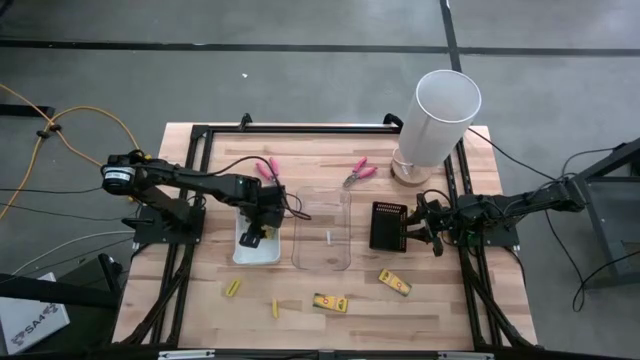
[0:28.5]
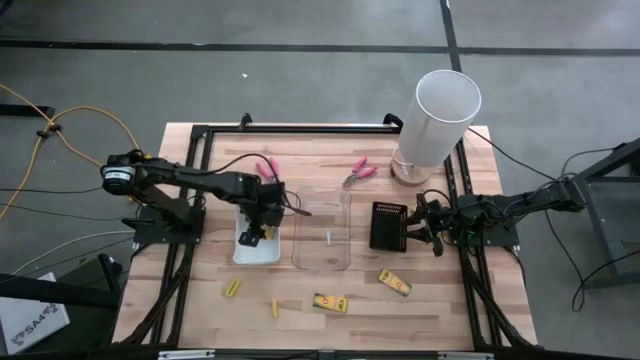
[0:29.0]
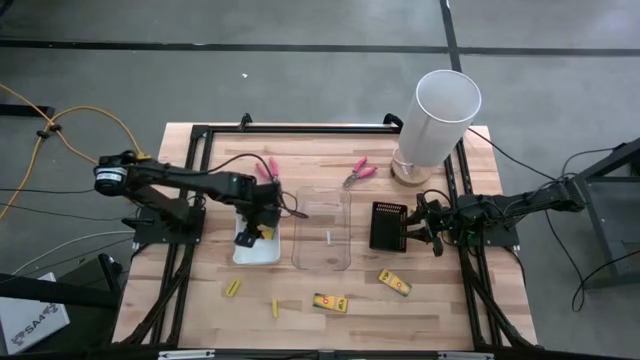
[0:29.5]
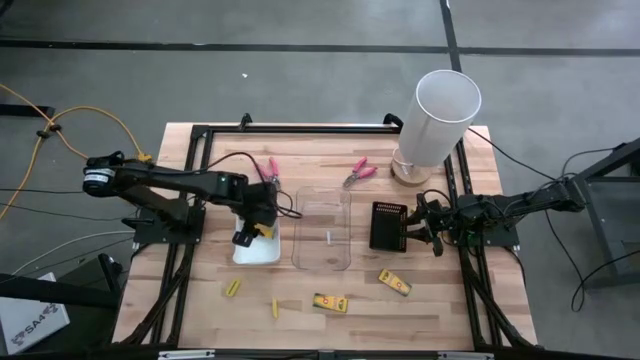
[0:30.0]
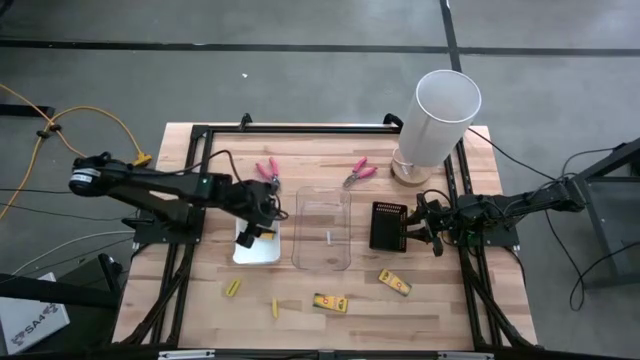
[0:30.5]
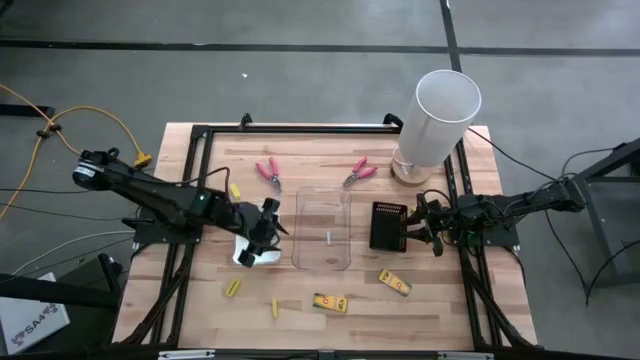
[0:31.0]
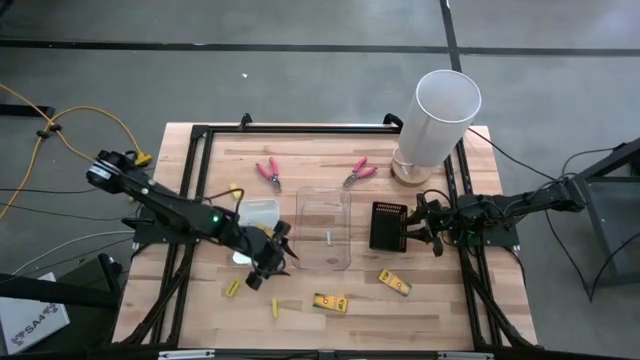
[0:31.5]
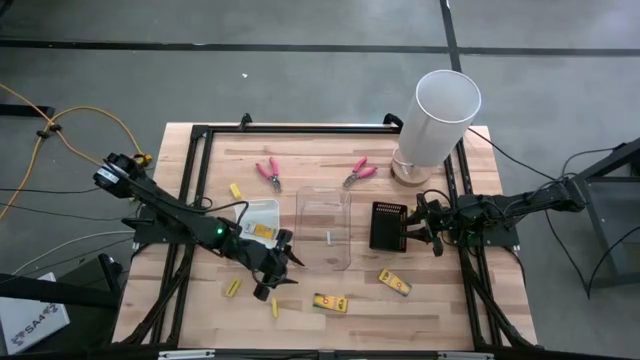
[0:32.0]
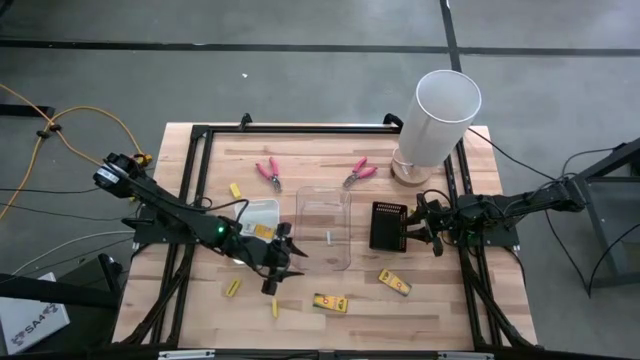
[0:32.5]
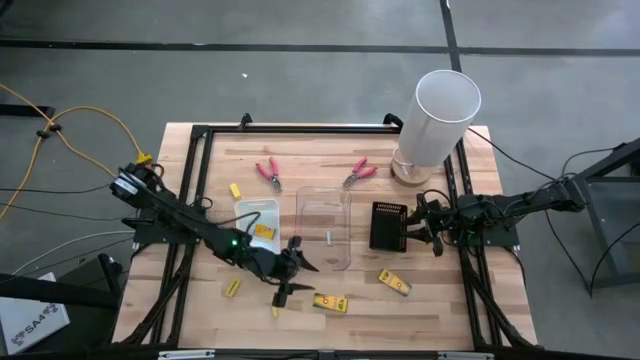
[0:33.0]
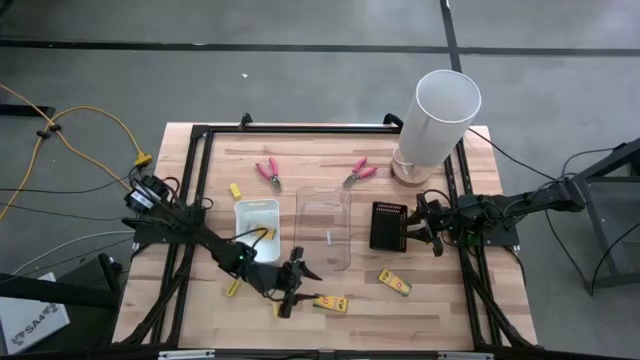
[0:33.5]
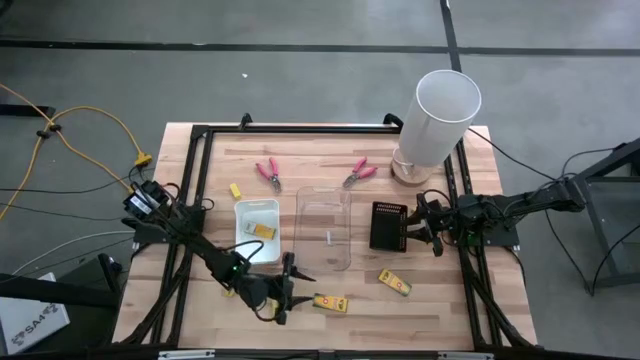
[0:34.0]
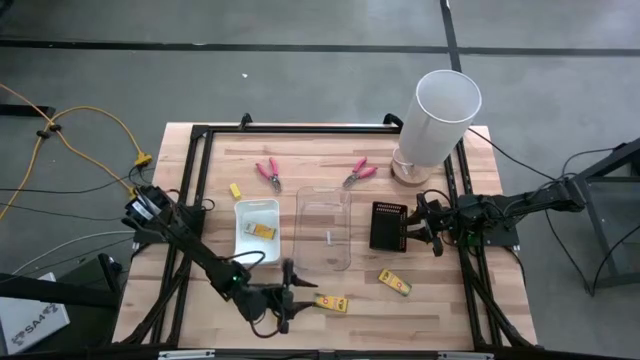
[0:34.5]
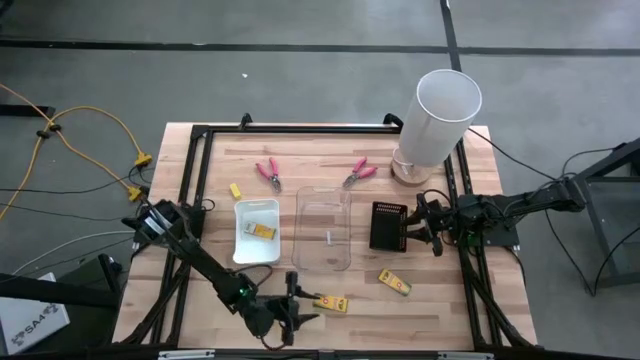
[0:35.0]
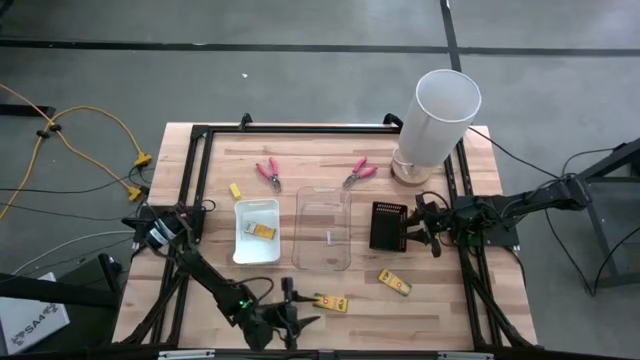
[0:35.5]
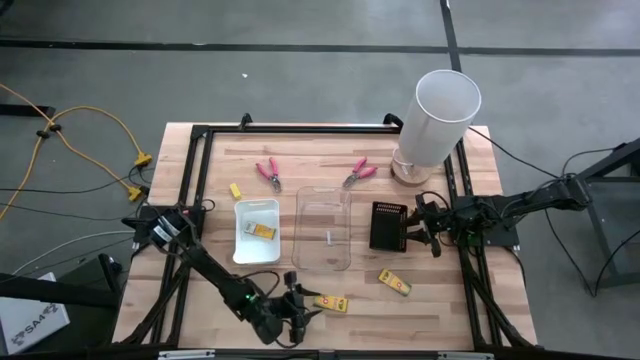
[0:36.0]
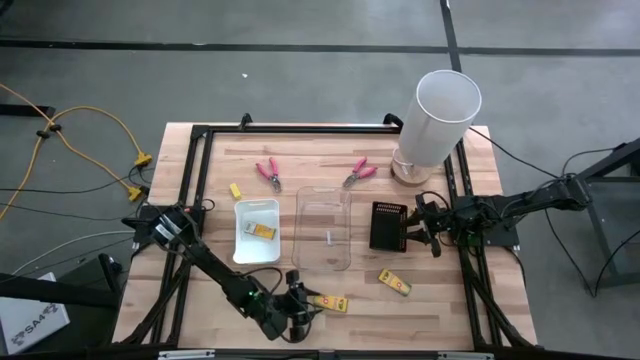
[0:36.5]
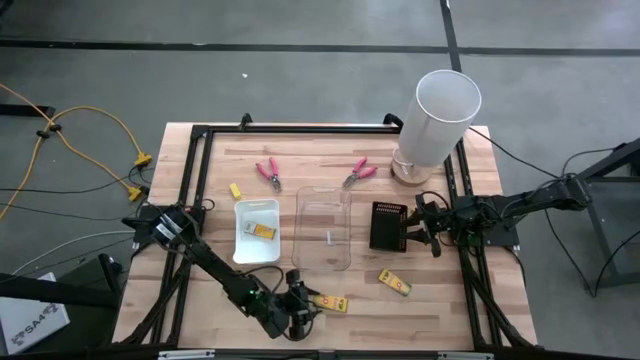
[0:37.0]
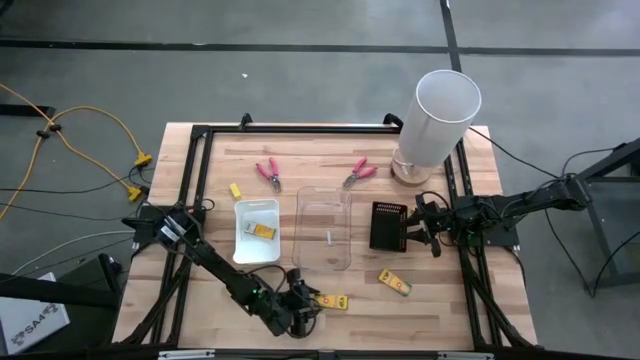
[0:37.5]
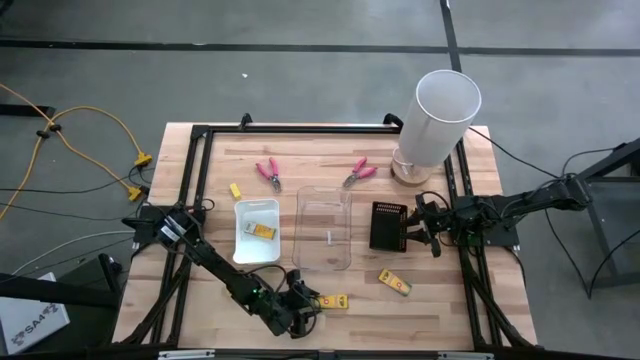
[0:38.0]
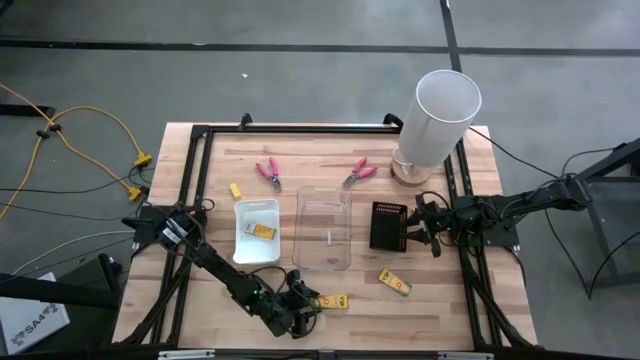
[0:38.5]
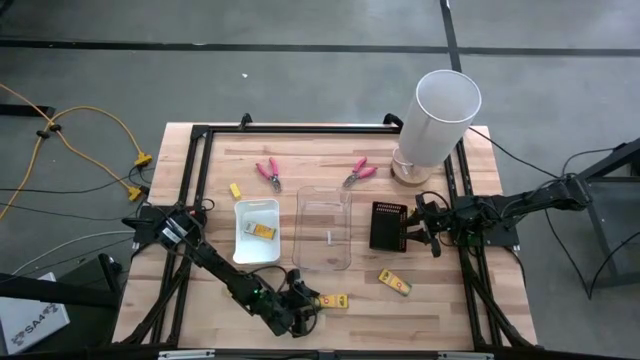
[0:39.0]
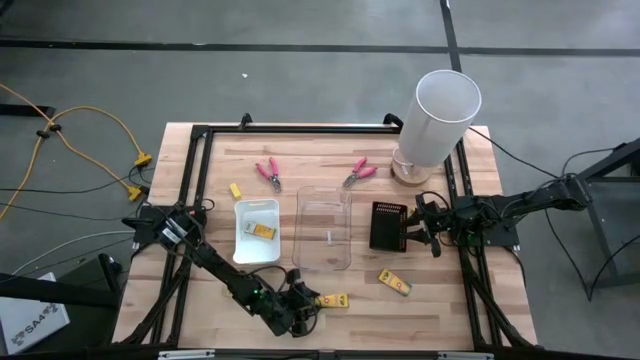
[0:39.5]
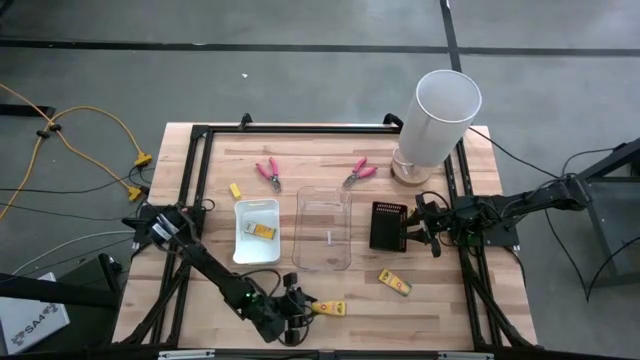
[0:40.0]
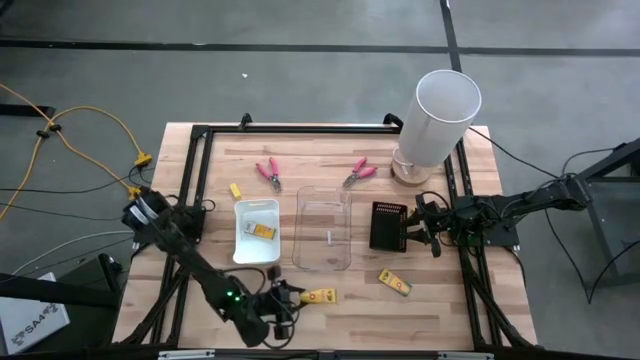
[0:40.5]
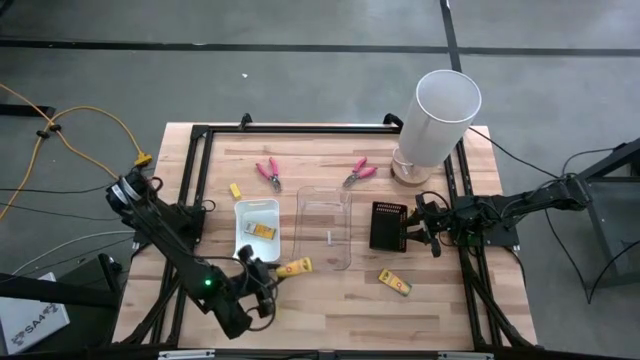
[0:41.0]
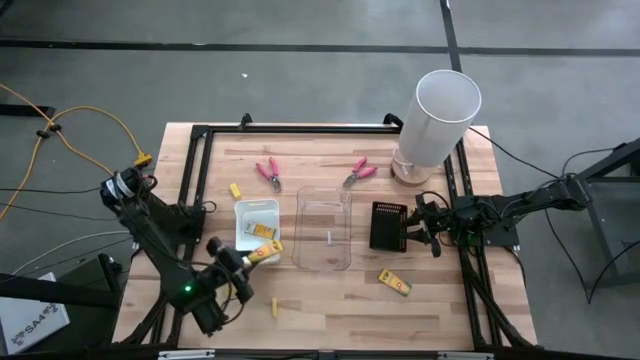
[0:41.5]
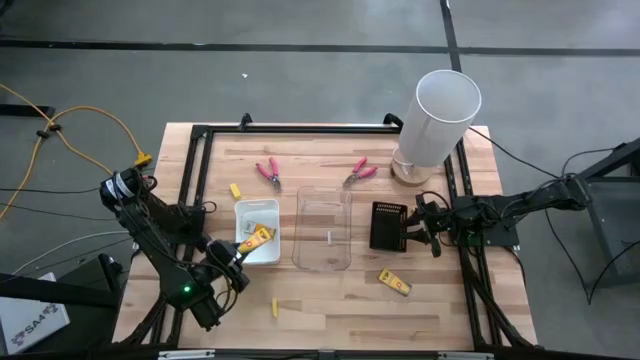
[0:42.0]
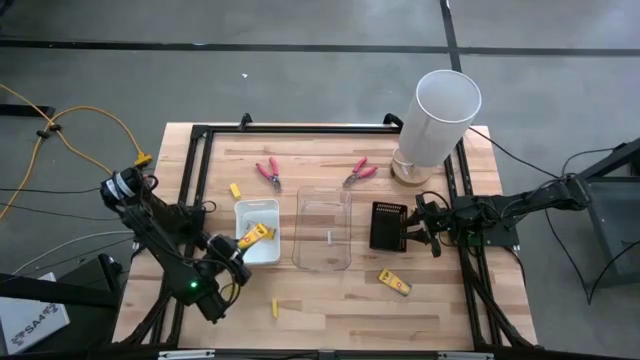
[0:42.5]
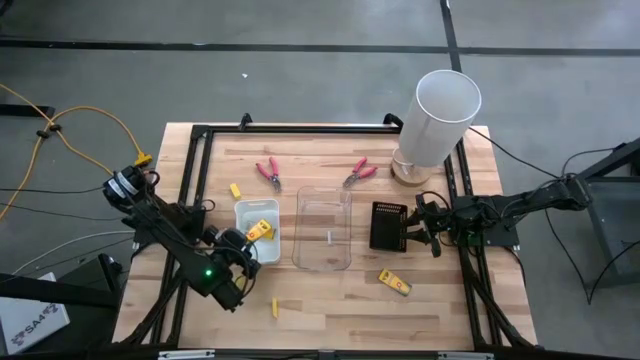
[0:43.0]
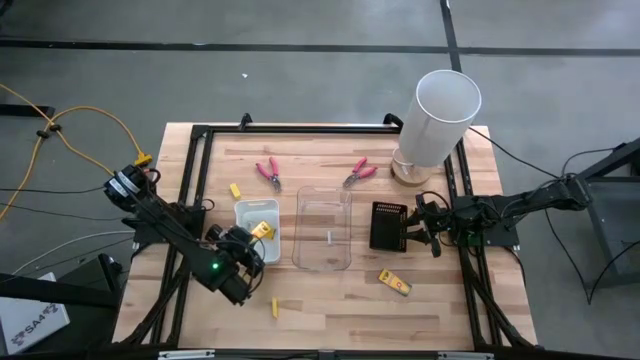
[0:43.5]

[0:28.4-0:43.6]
Task: Pick & Place School Supplies
Put the crayon box into the white bin

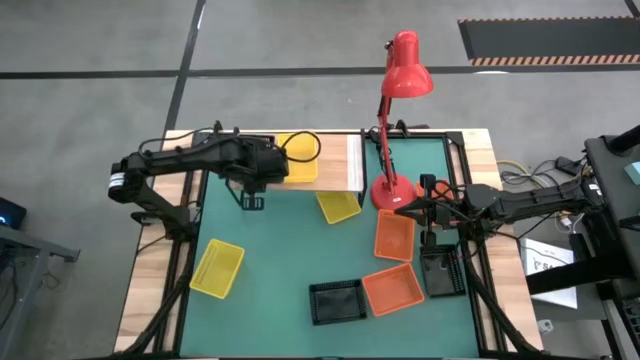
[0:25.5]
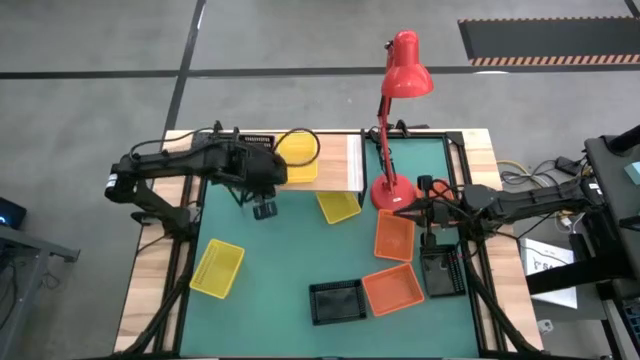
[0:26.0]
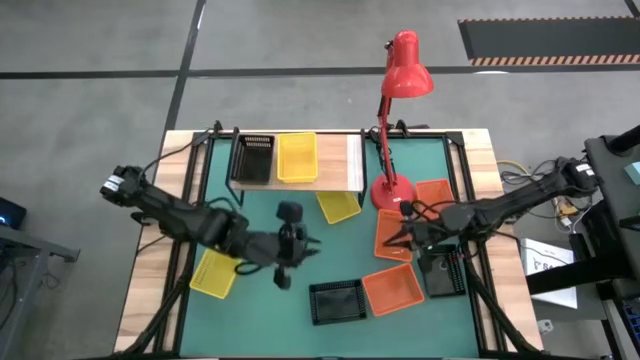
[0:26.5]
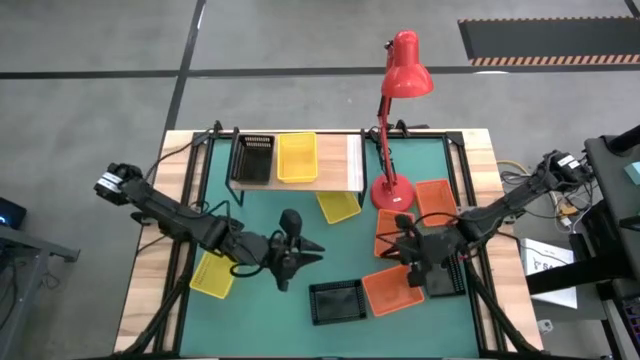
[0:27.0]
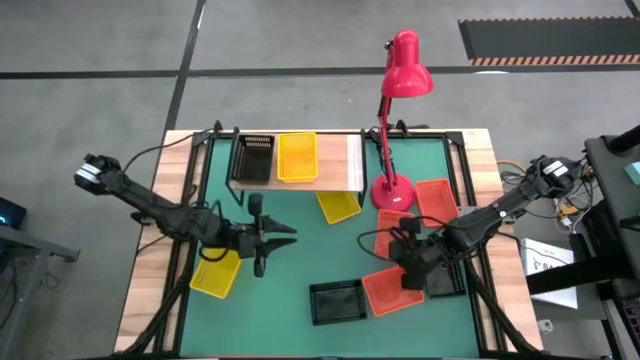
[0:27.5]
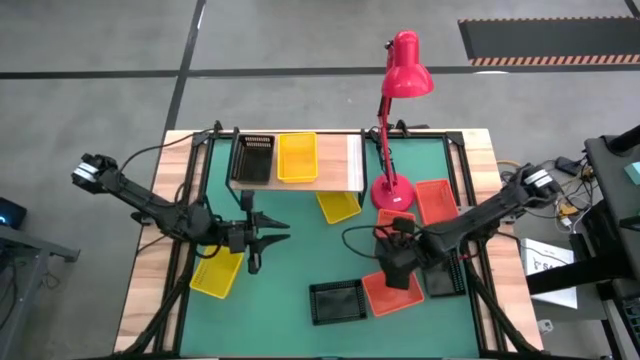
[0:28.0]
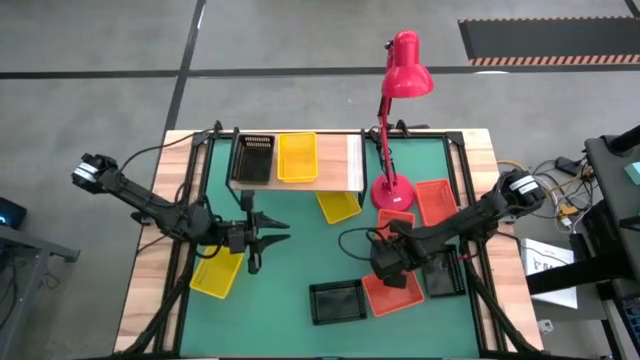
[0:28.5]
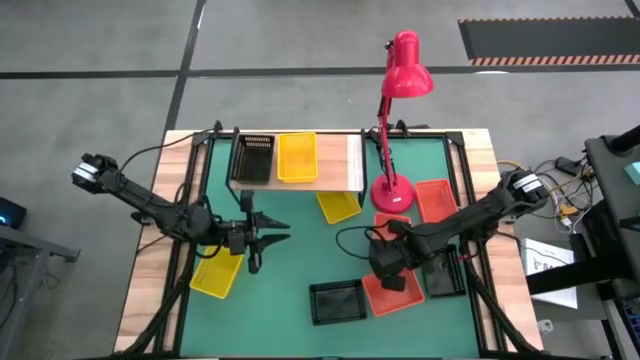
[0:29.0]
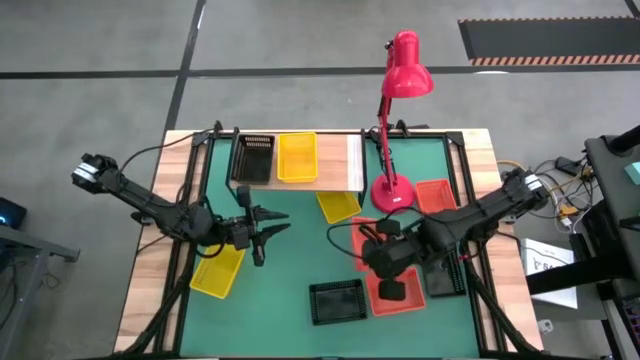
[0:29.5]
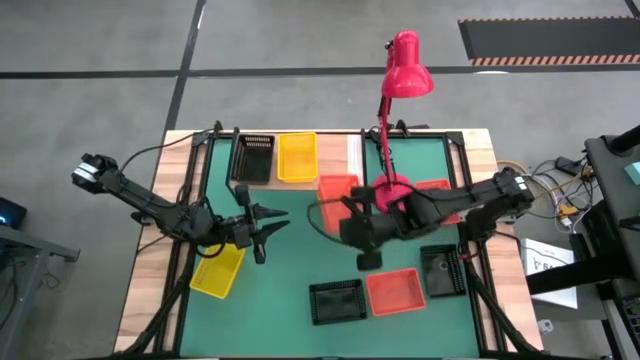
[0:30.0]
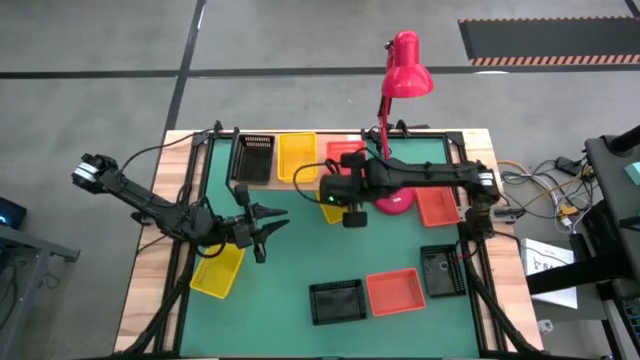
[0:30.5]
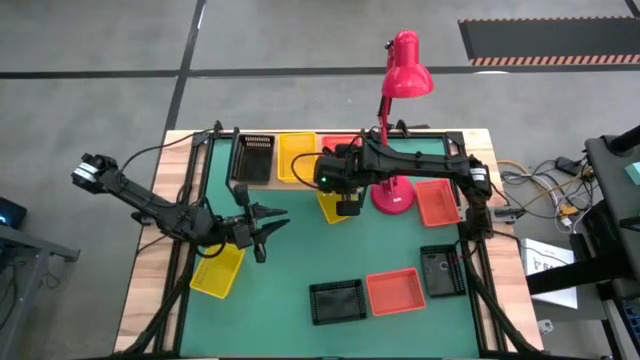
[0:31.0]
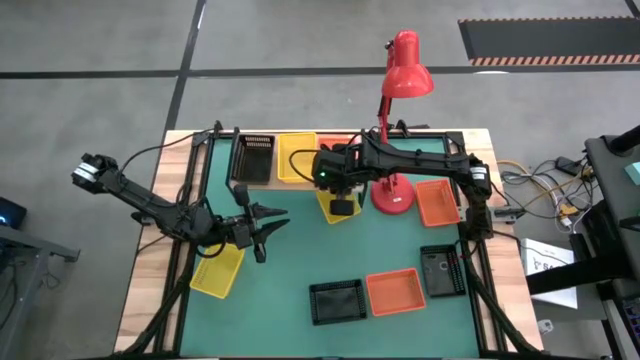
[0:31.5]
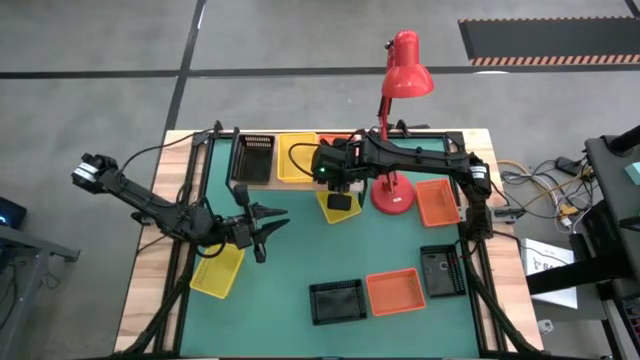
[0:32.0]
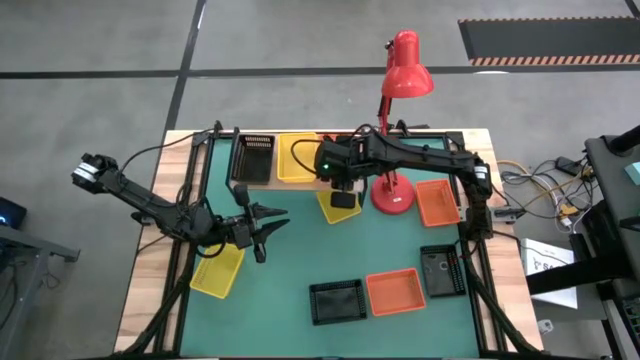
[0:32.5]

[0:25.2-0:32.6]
Task: Stack baskets on shelf by color
Put the top left orange bin on the shelf
